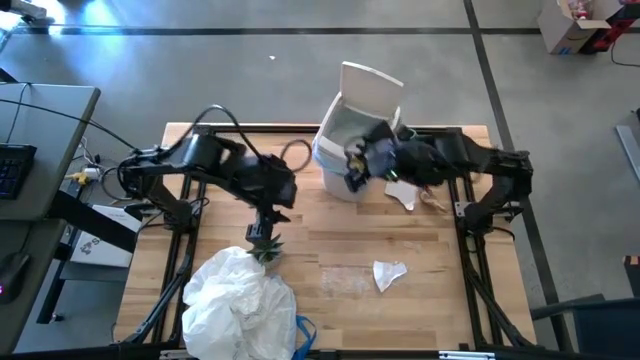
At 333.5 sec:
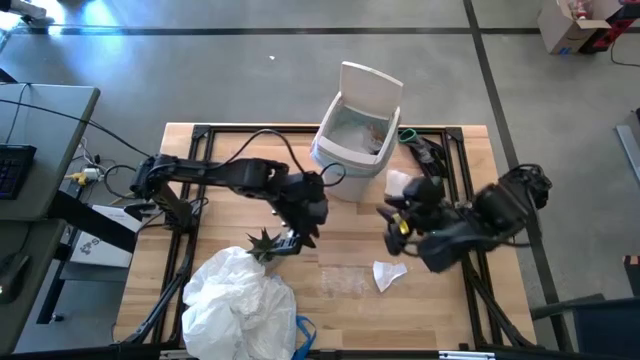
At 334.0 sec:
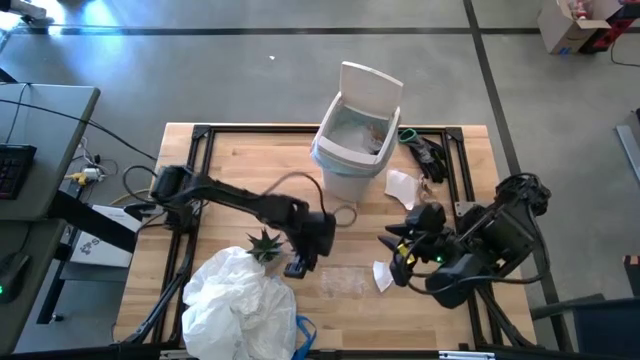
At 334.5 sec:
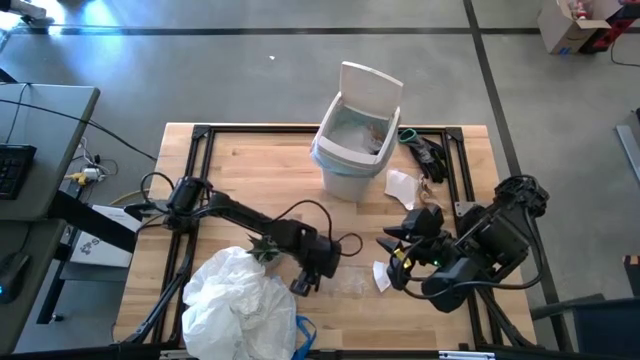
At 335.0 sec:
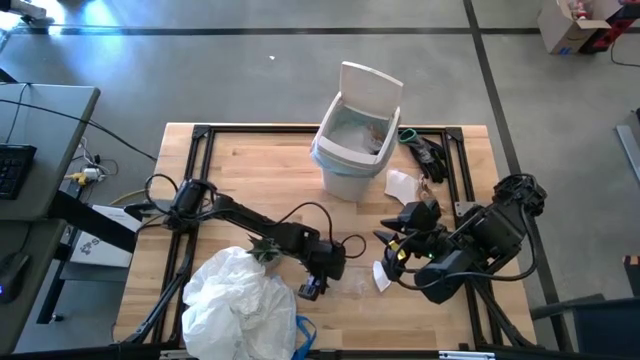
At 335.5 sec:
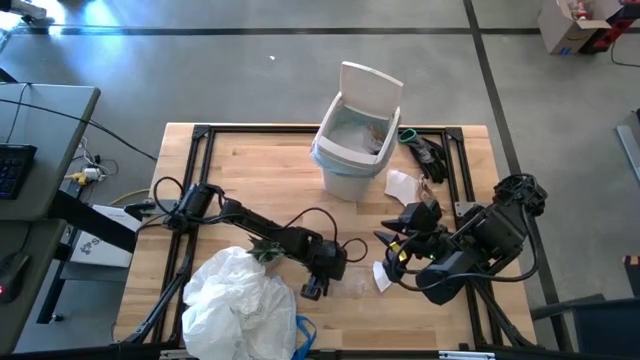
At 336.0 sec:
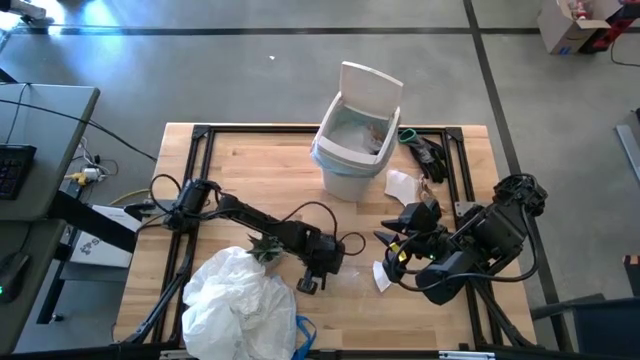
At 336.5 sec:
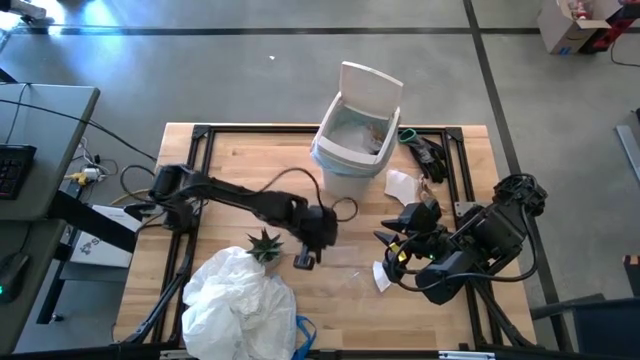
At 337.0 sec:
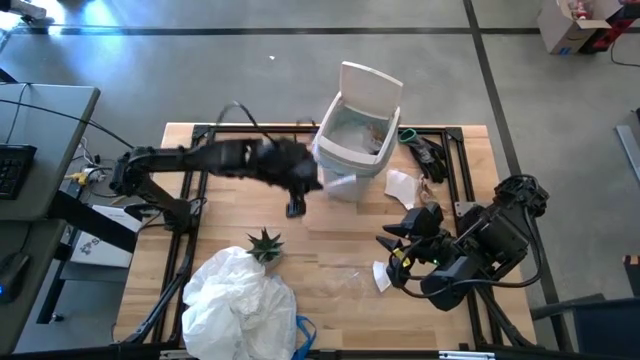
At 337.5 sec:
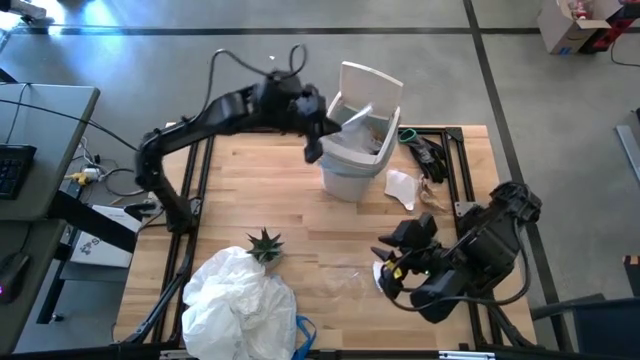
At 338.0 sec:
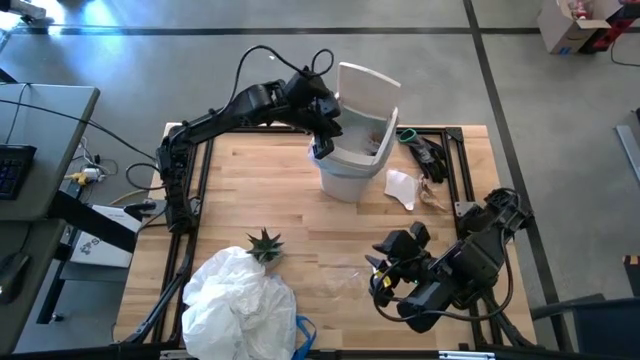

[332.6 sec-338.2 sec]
Task: place trash/remove bag and relplace
Put the transparent plastic into the trash bin

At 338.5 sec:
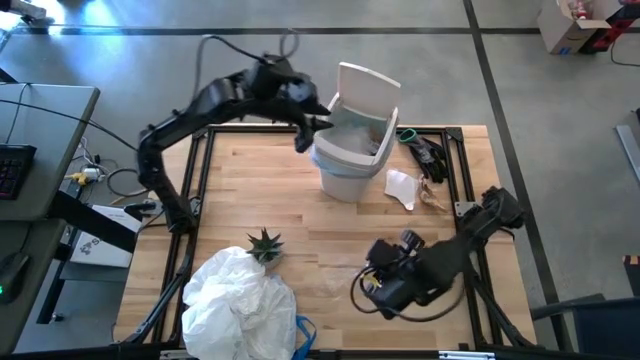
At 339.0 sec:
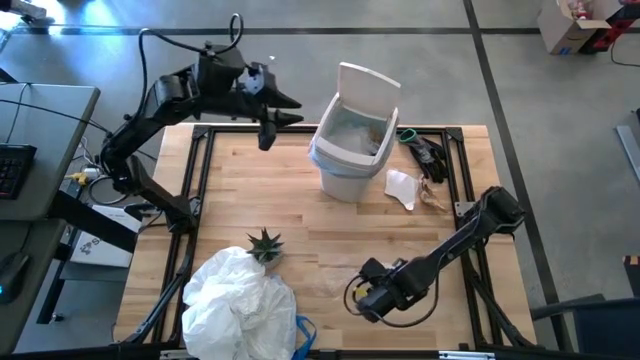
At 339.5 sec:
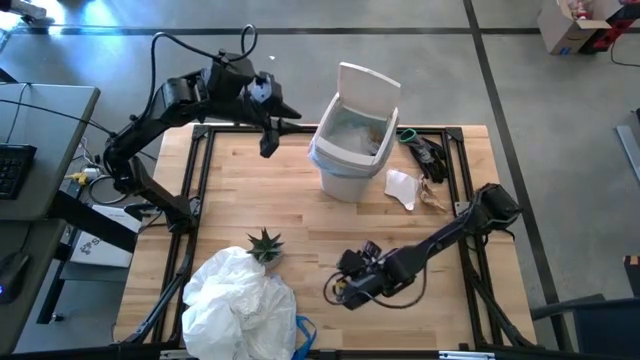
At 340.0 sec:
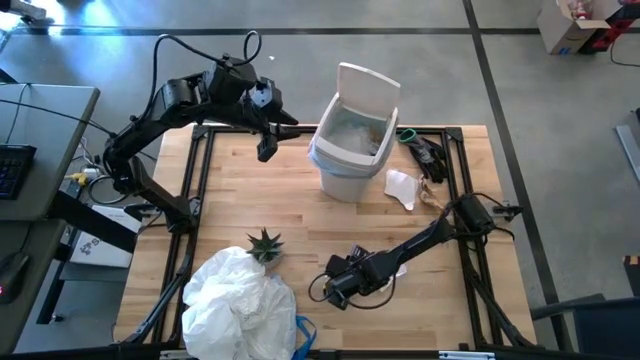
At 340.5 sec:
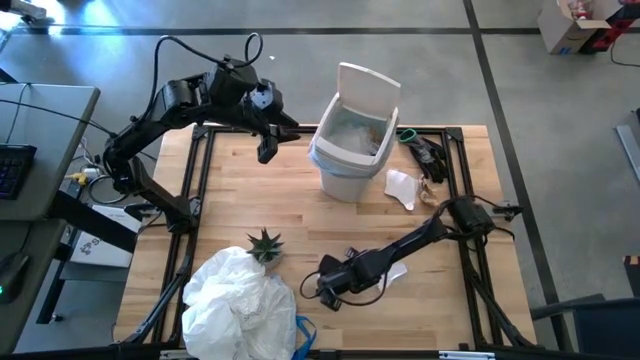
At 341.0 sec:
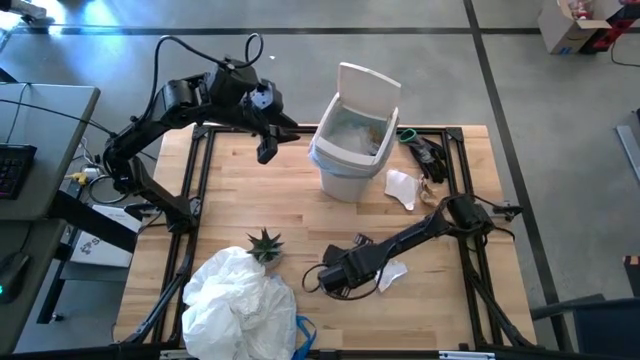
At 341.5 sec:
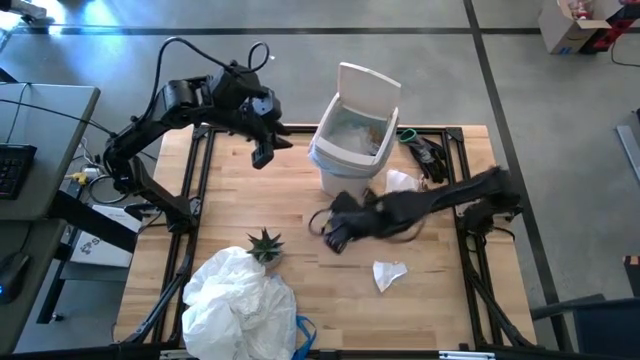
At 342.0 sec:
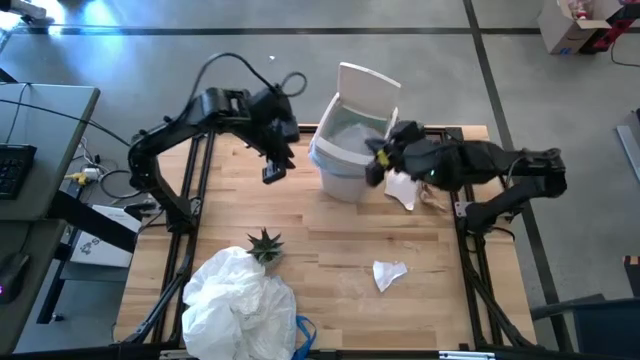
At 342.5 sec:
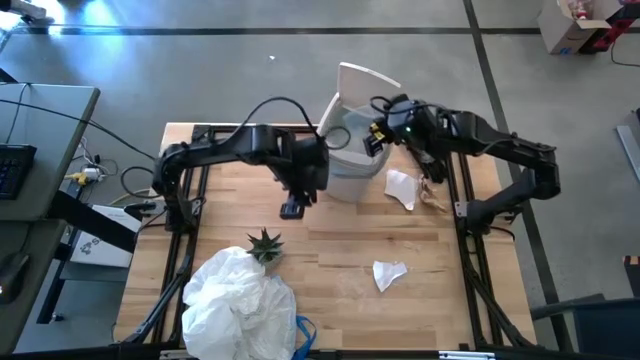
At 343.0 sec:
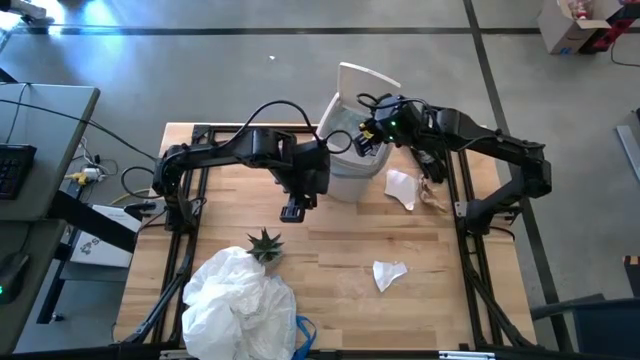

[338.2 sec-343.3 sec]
Put the transparent plastic into the trash bin

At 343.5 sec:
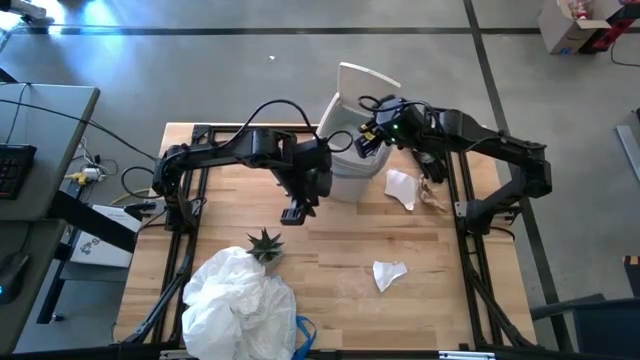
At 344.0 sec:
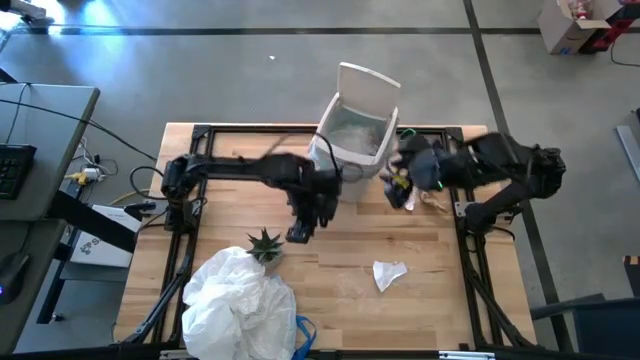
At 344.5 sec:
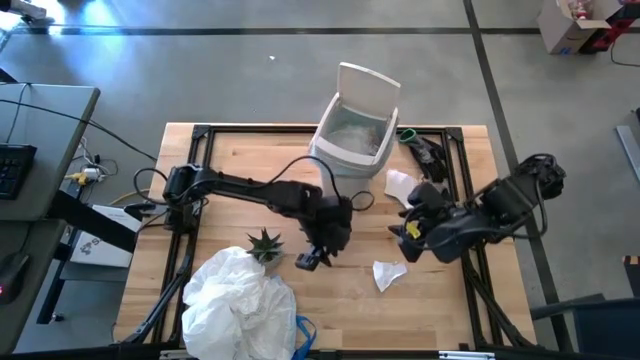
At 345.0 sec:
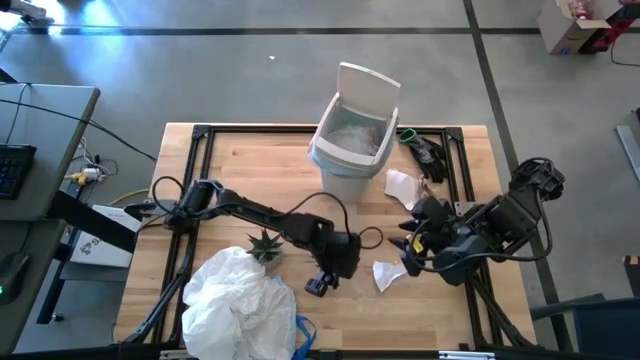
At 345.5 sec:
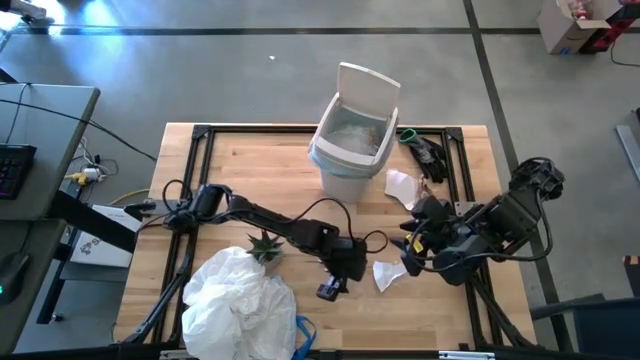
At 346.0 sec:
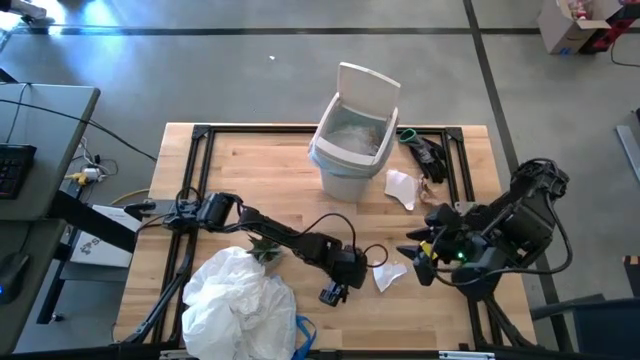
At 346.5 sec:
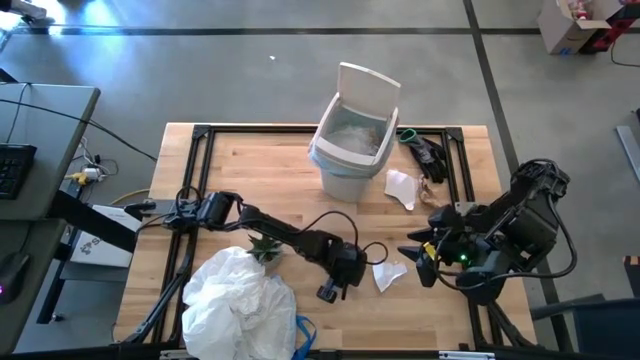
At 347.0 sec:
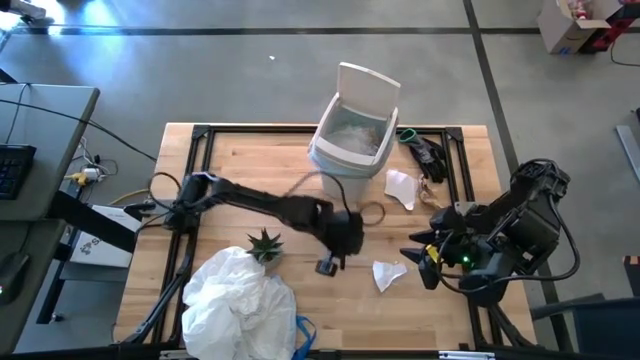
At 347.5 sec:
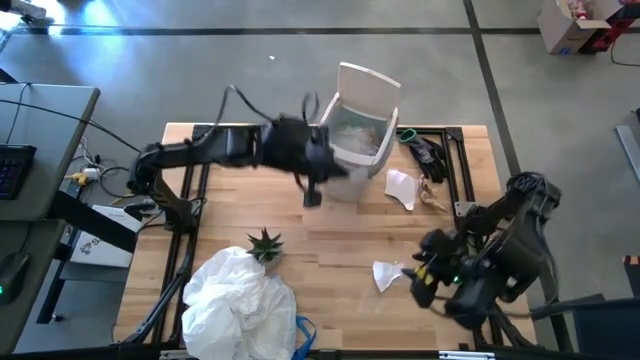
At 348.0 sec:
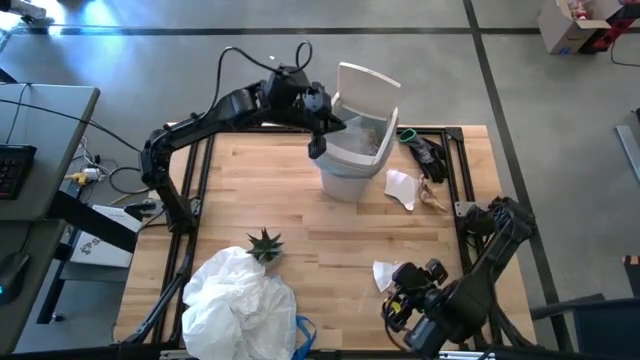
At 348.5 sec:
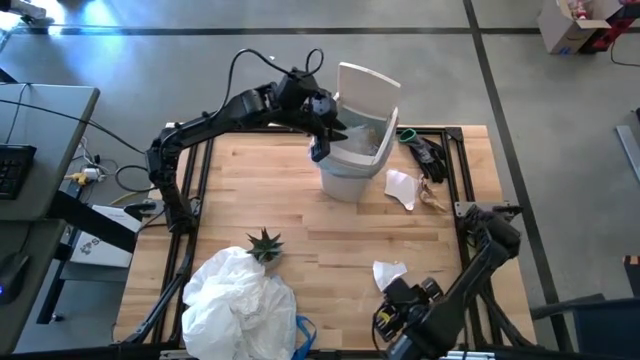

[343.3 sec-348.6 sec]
Put the transparent plastic into the trash bin

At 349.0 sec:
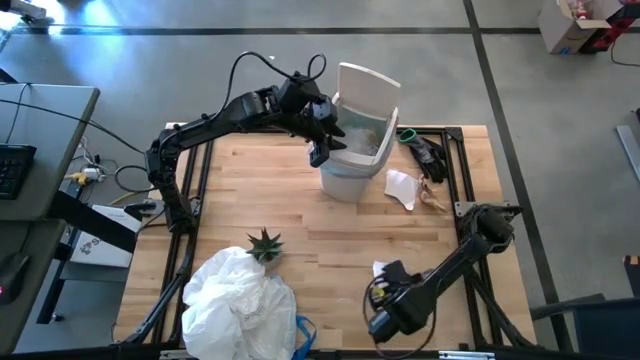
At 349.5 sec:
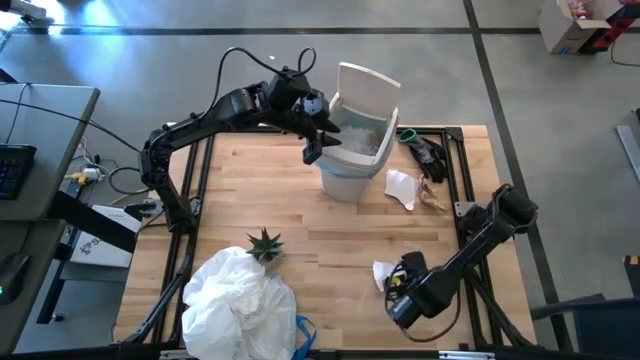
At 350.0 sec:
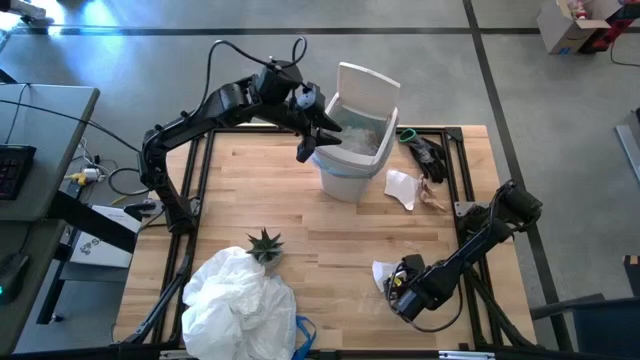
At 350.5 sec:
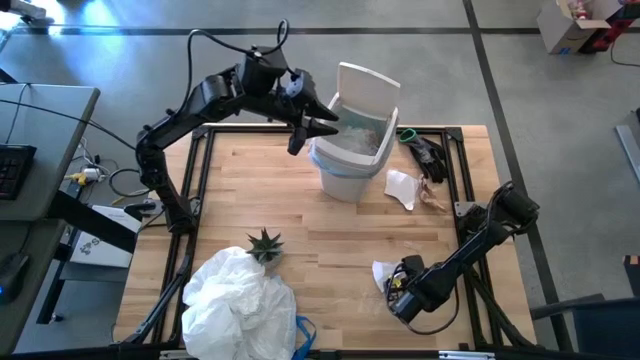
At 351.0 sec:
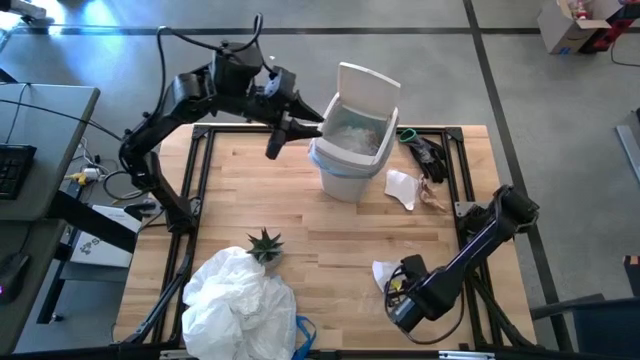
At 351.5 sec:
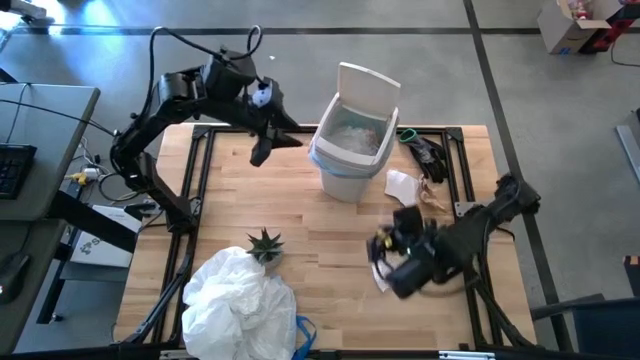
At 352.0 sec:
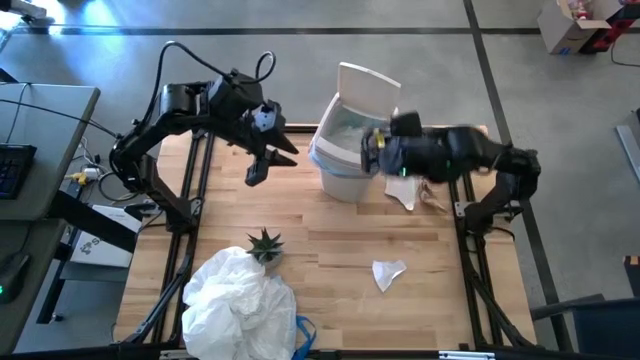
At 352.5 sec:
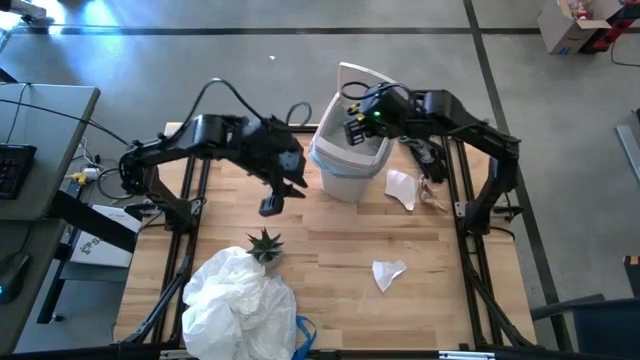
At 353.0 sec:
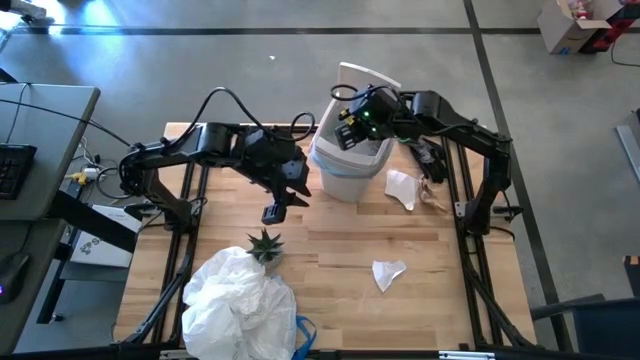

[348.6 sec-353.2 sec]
Put the transparent plastic into the trash bin
